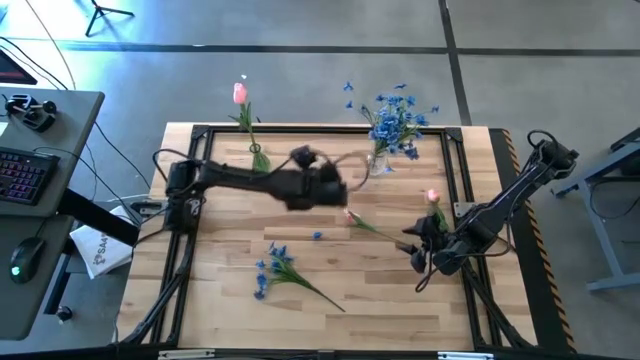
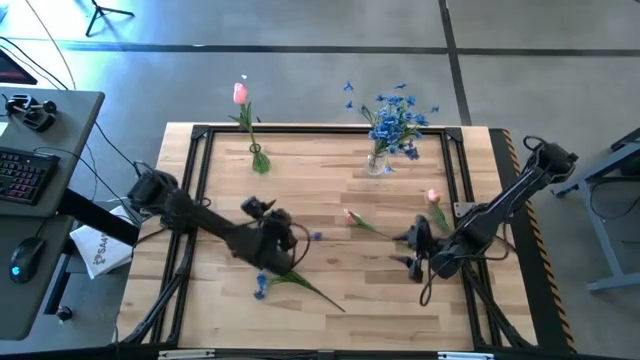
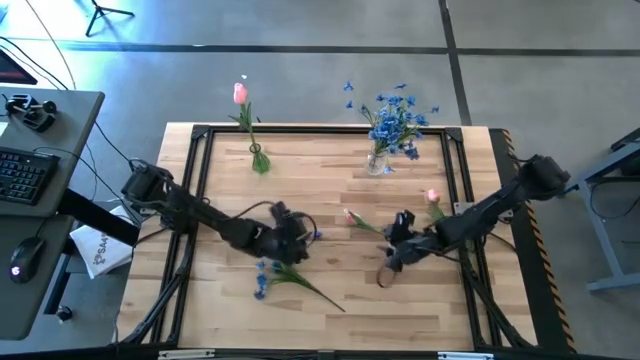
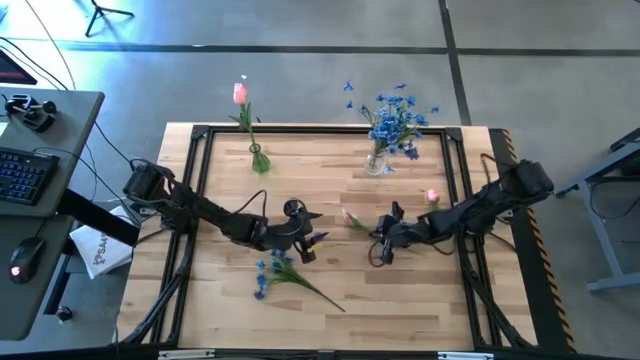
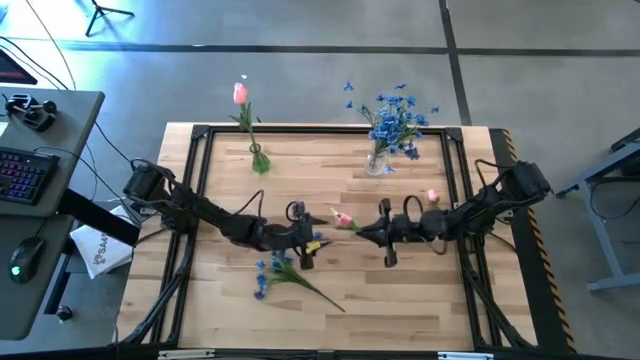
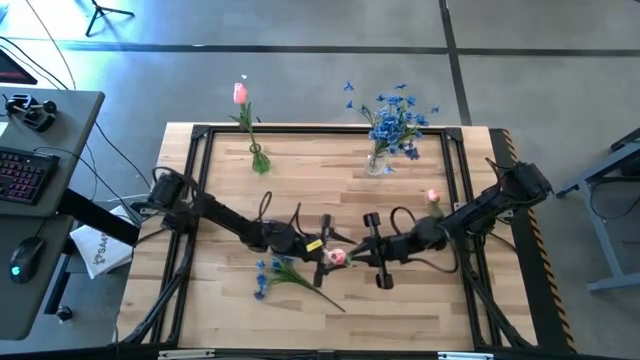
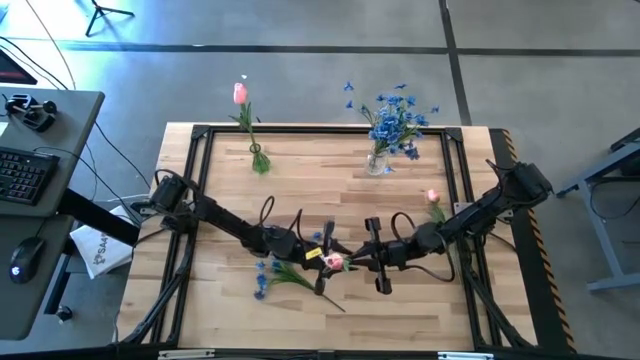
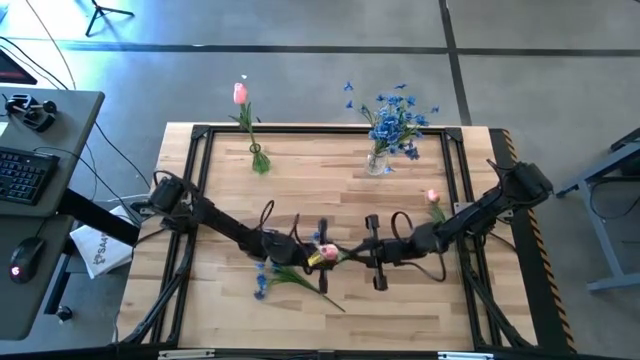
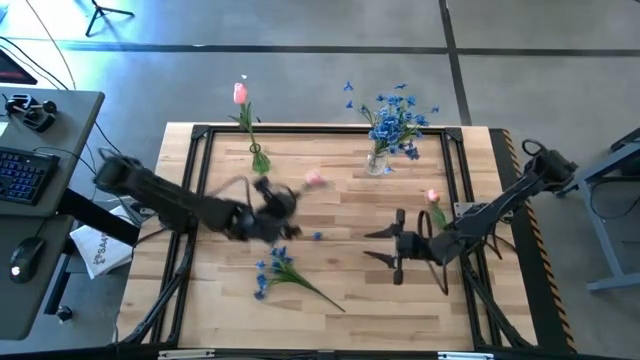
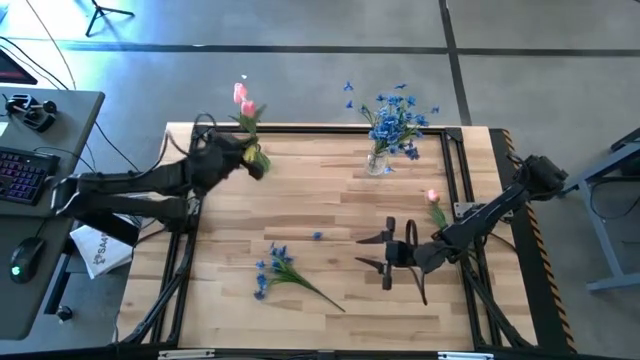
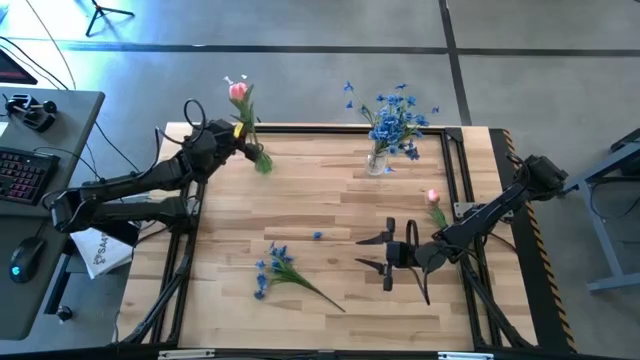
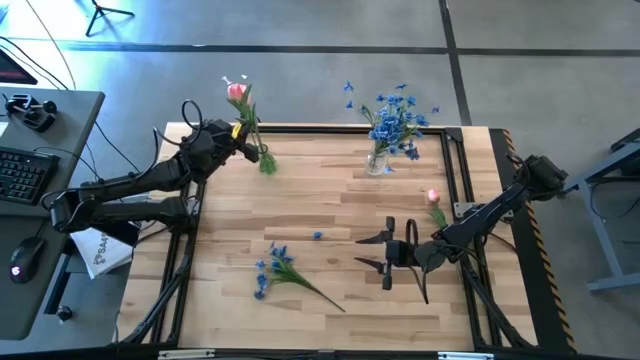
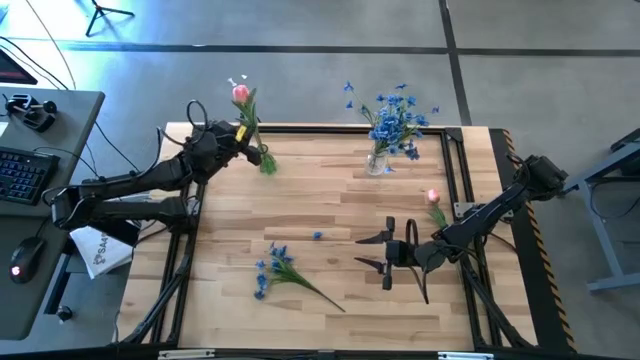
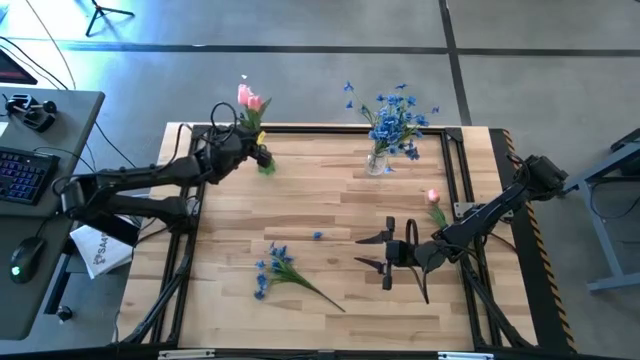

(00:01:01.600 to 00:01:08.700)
Task: Sort flowers into vase by color
Put the left pink tulip into the green vase

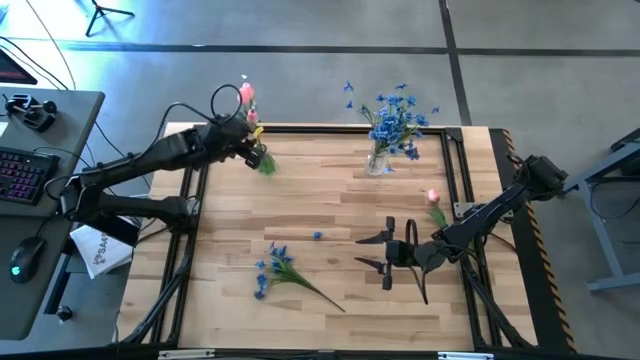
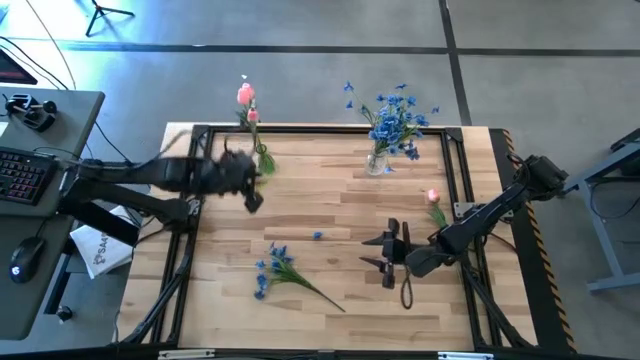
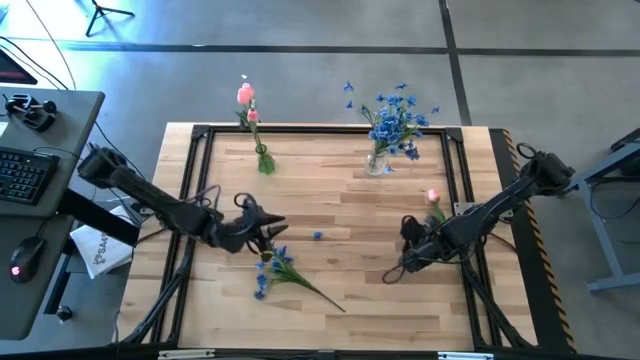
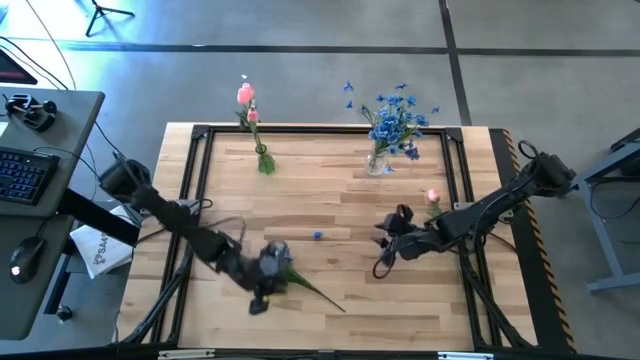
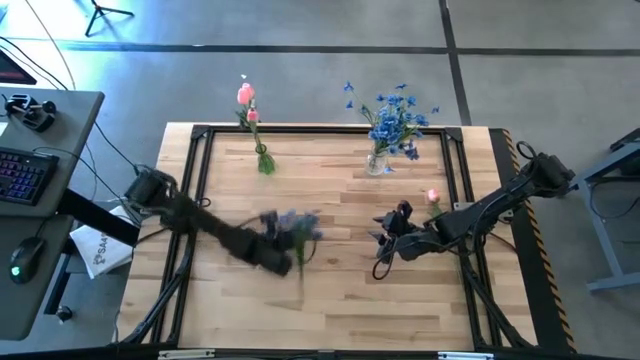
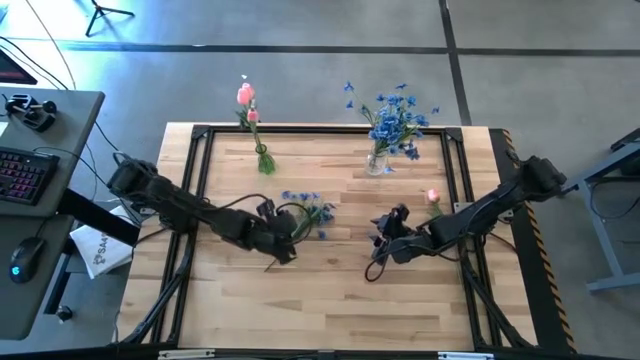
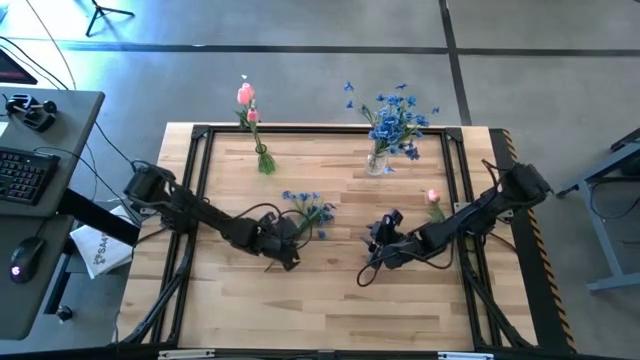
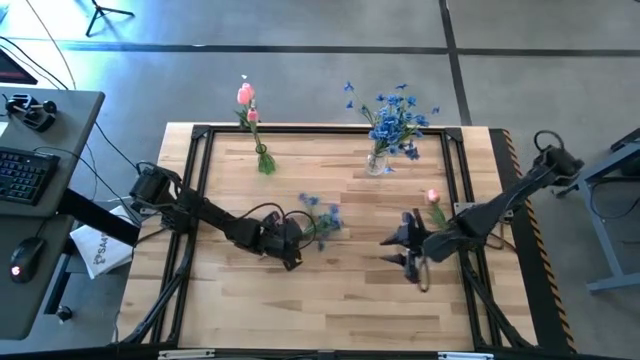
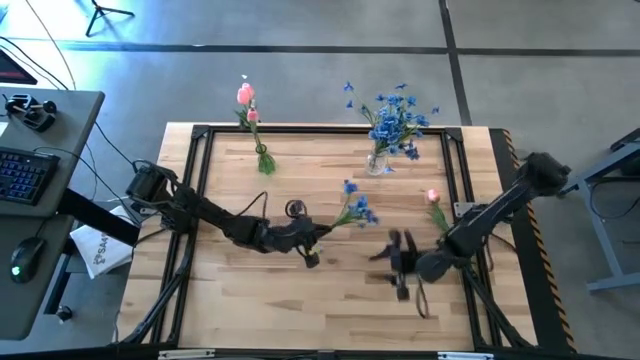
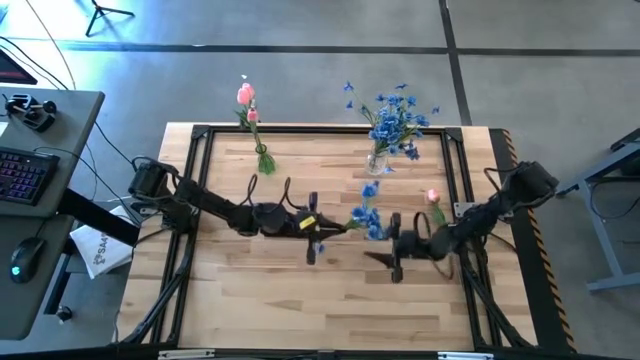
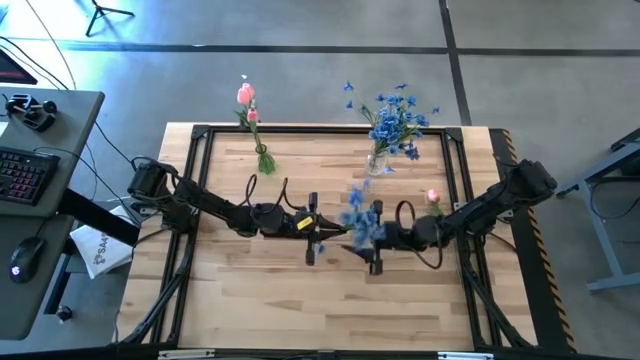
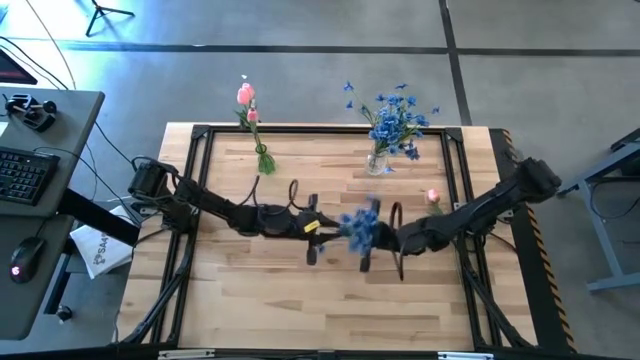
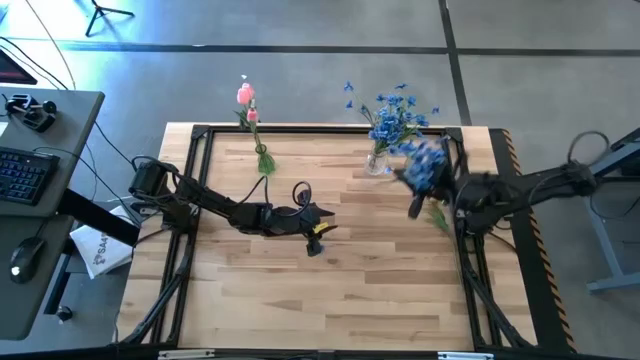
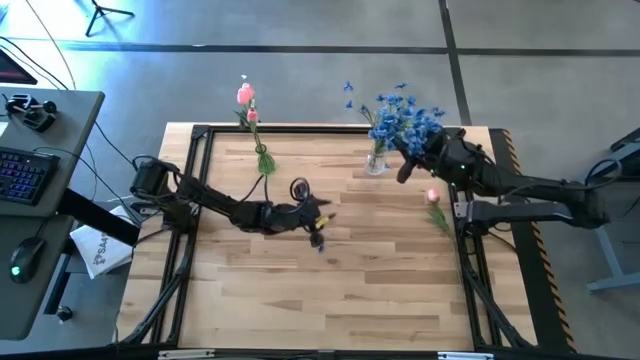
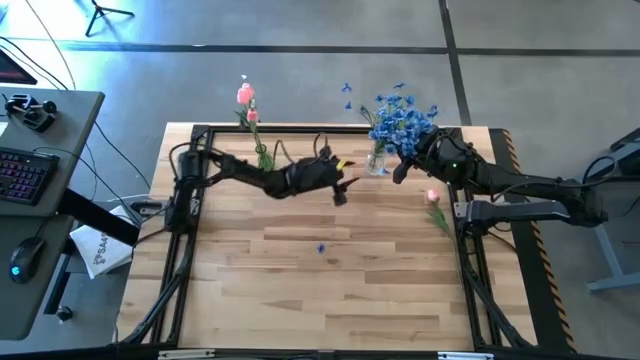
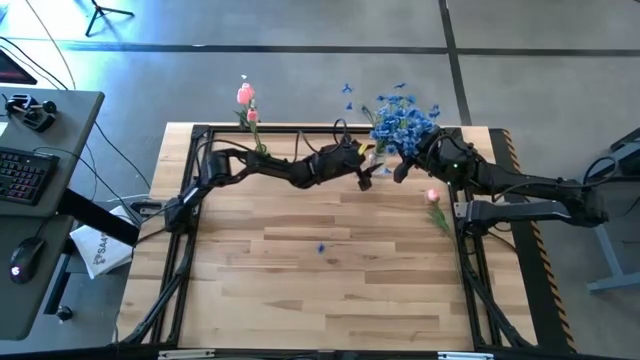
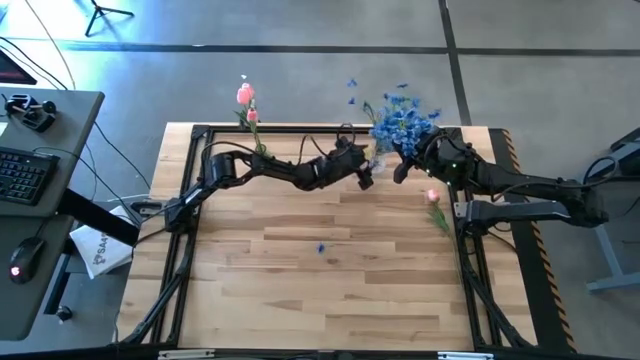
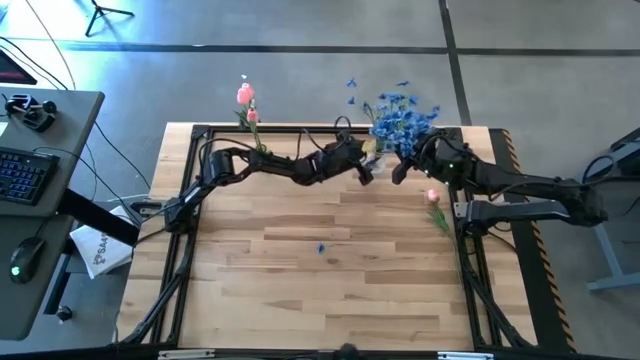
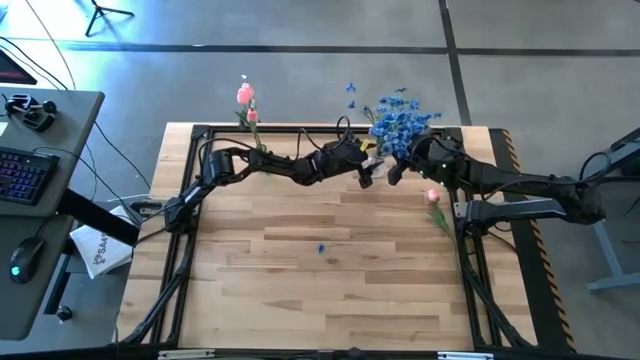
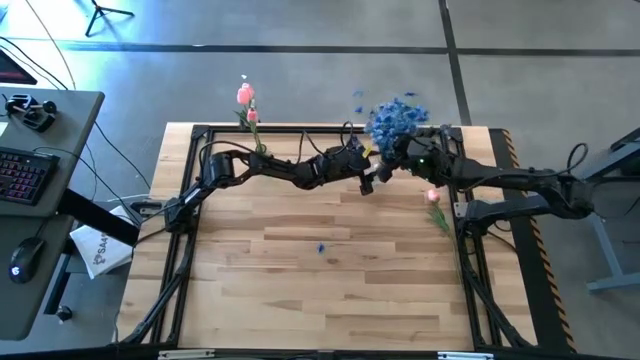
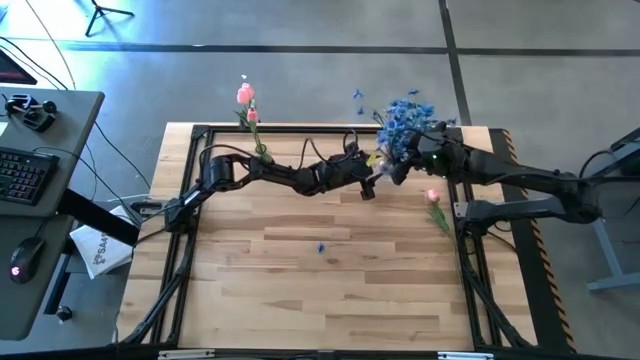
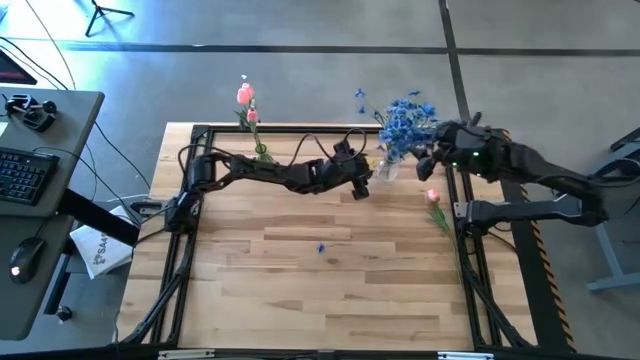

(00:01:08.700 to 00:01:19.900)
Put the blue flowers into the transparent vase

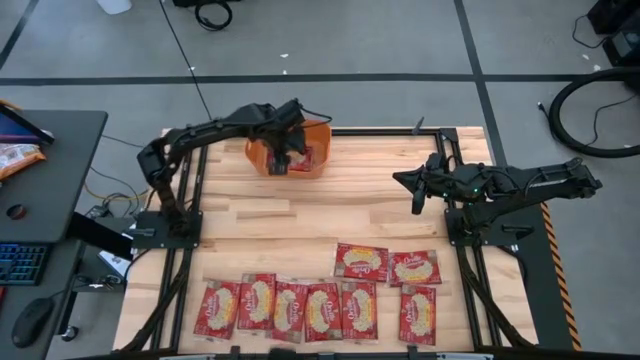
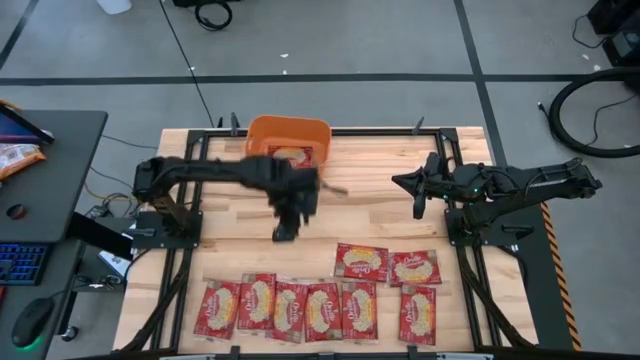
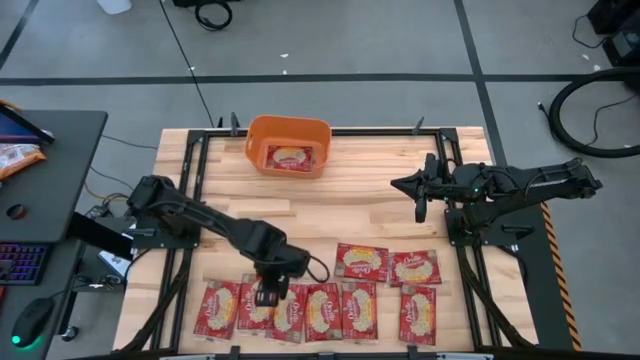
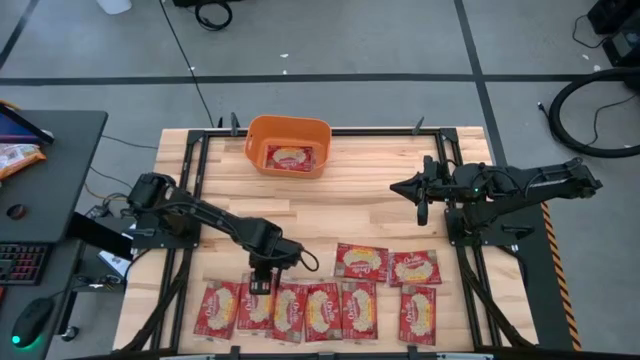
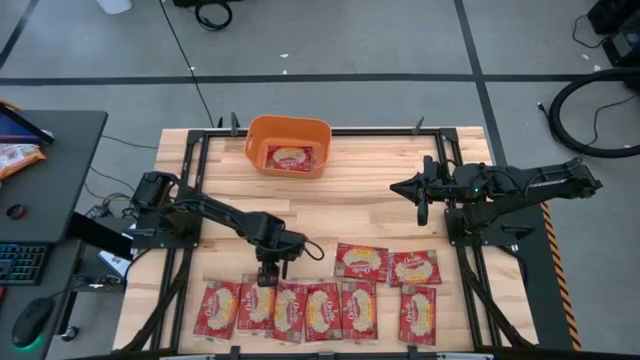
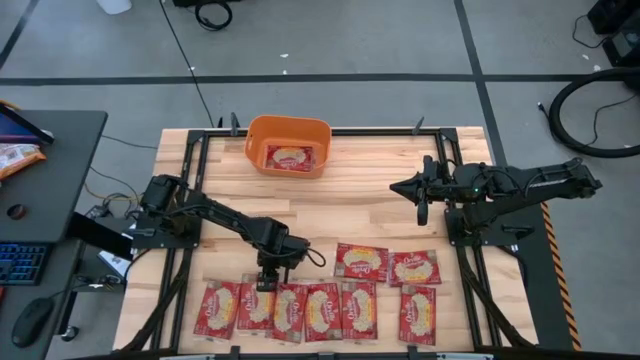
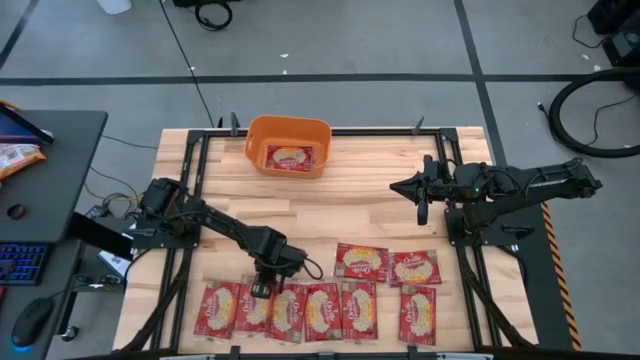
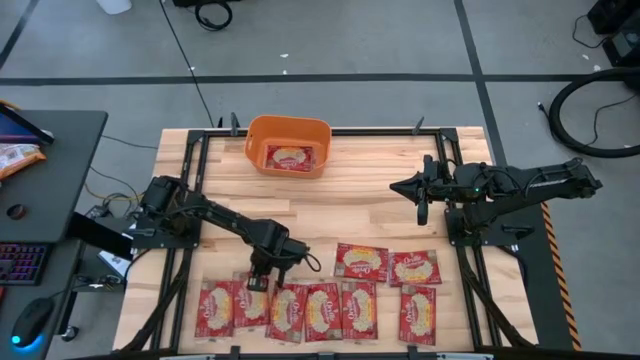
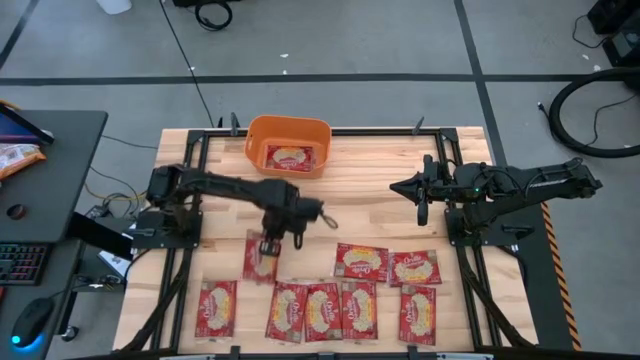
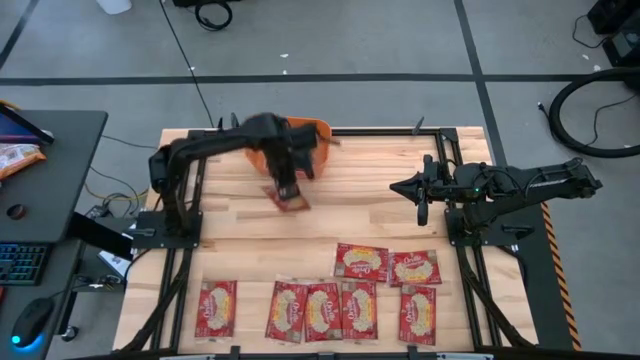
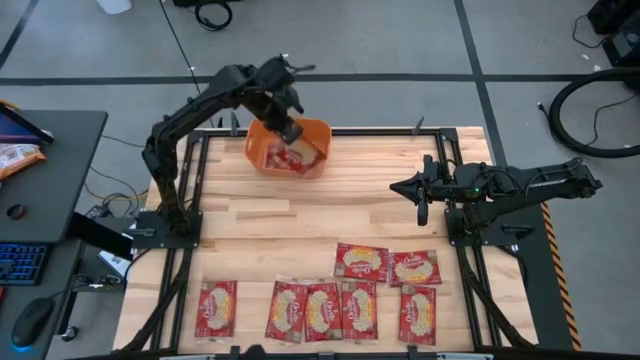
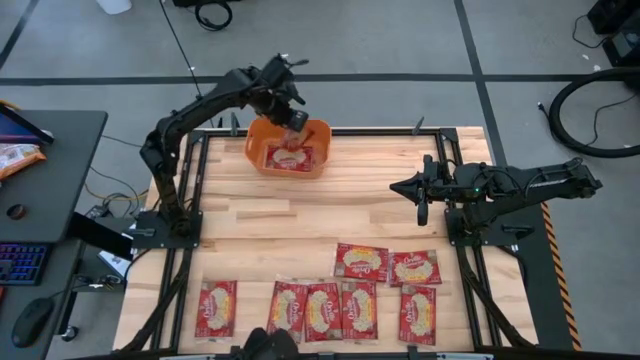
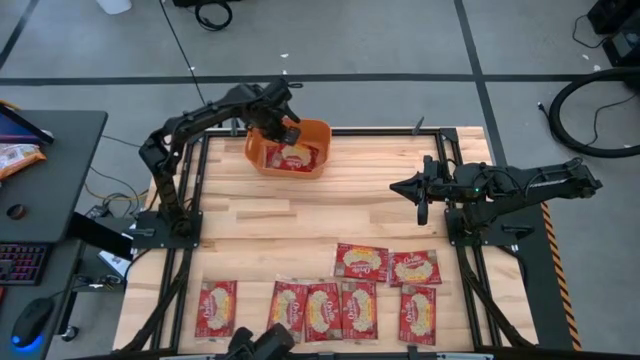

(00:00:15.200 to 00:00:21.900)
Task: Sort popcorn bags into baskets
Put the red popcorn bag into the orange container
